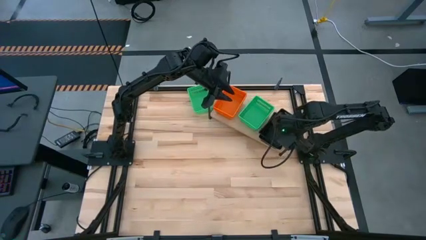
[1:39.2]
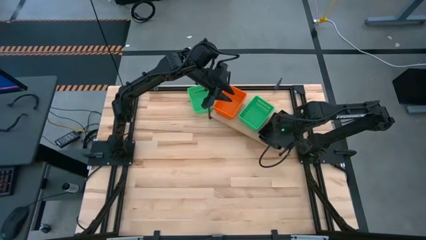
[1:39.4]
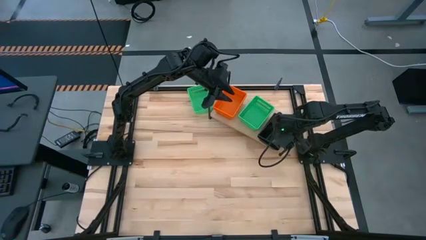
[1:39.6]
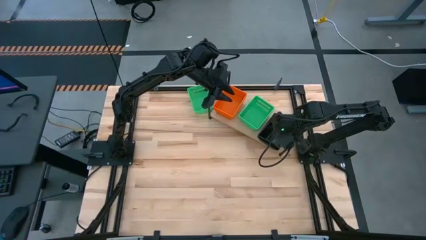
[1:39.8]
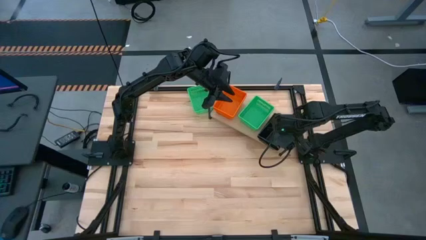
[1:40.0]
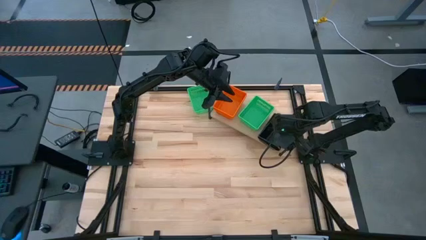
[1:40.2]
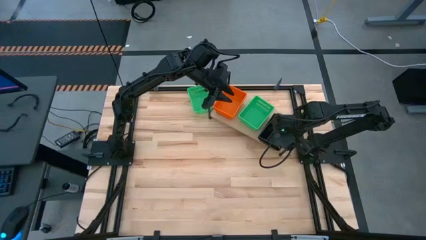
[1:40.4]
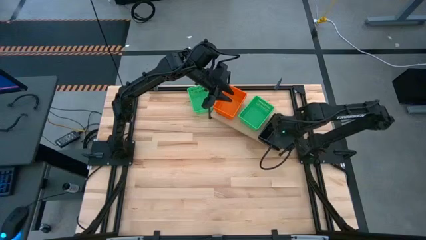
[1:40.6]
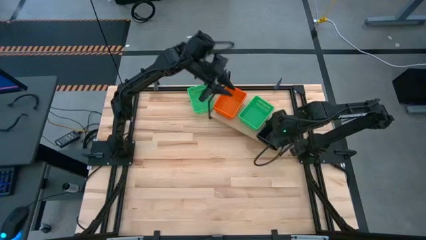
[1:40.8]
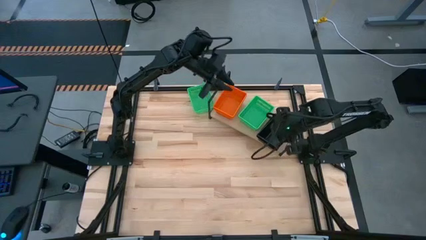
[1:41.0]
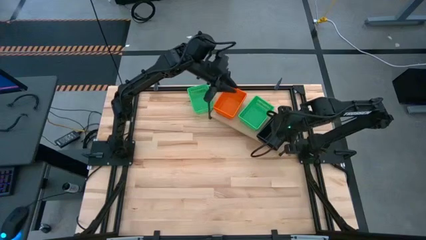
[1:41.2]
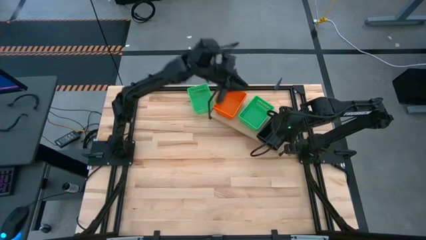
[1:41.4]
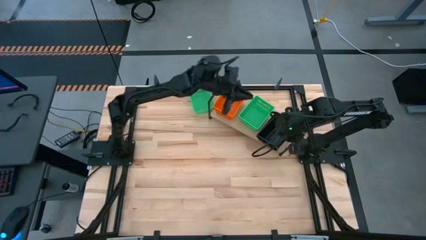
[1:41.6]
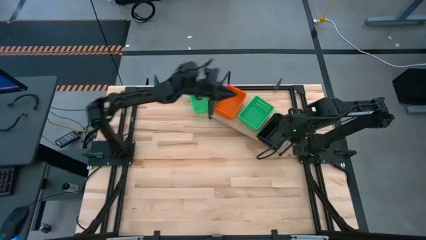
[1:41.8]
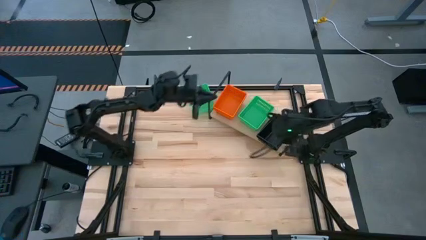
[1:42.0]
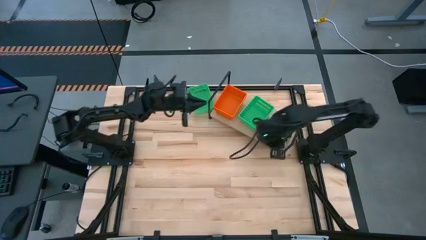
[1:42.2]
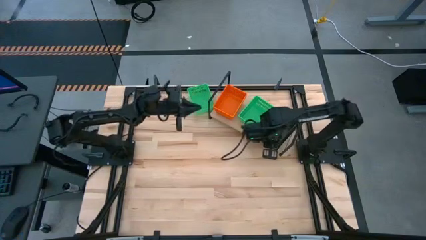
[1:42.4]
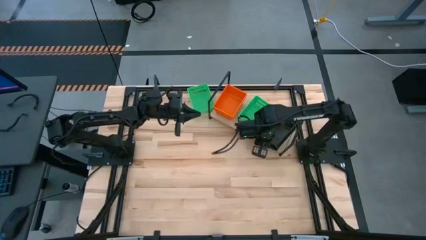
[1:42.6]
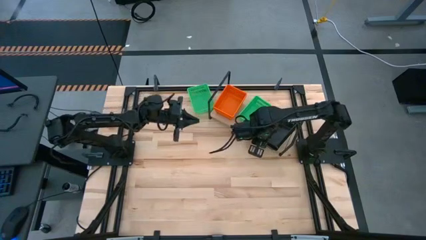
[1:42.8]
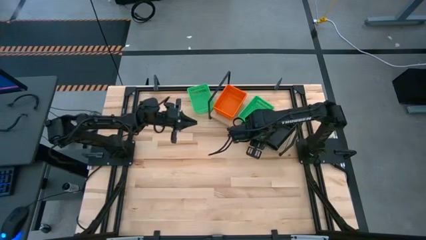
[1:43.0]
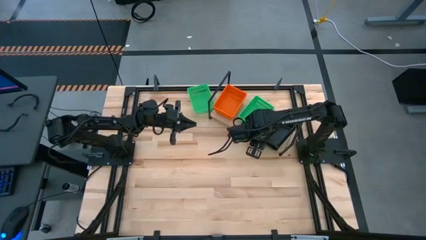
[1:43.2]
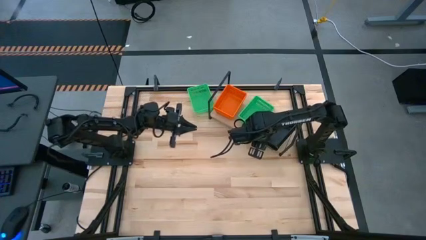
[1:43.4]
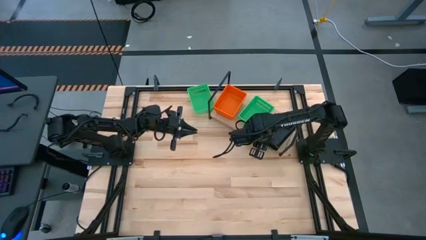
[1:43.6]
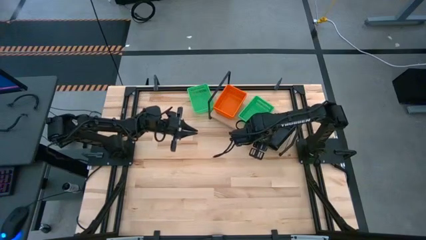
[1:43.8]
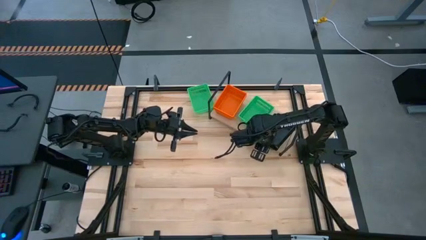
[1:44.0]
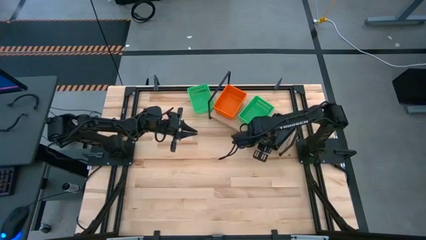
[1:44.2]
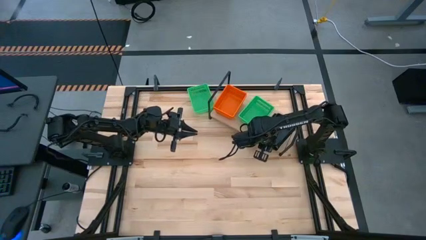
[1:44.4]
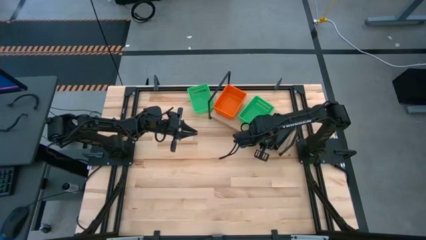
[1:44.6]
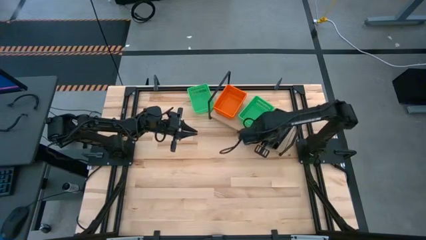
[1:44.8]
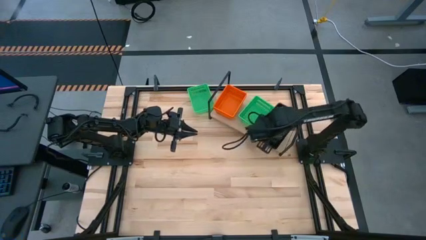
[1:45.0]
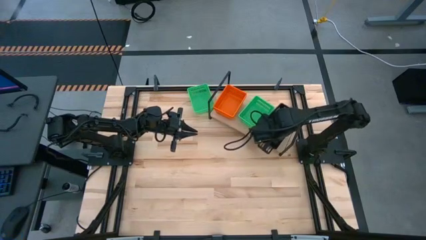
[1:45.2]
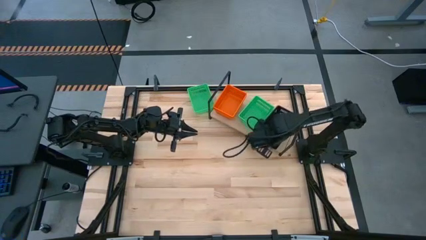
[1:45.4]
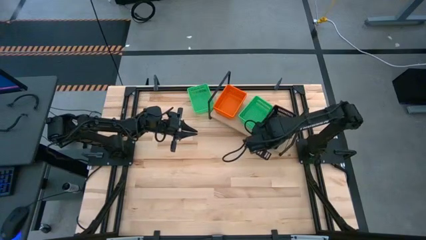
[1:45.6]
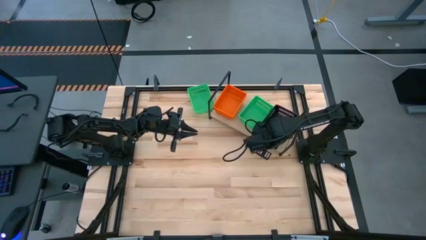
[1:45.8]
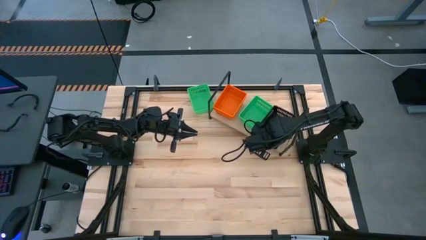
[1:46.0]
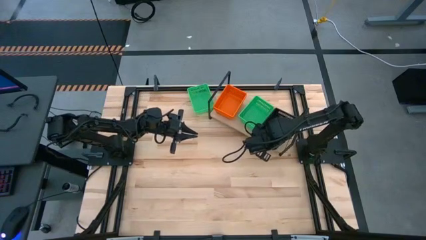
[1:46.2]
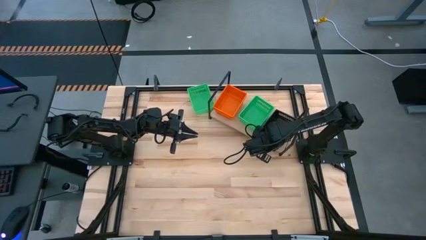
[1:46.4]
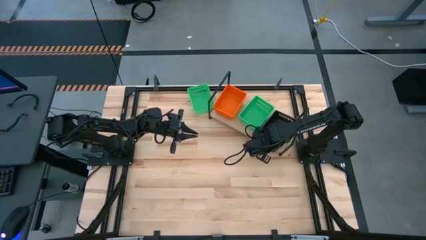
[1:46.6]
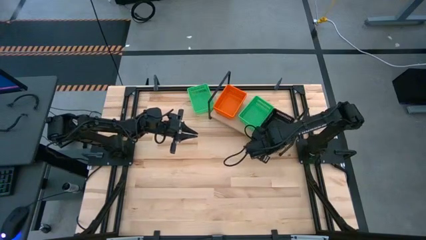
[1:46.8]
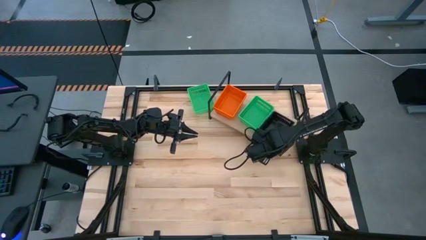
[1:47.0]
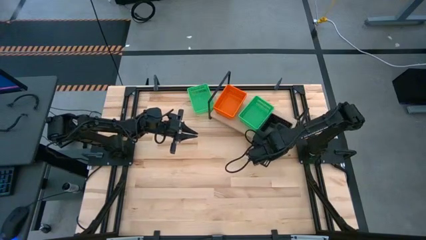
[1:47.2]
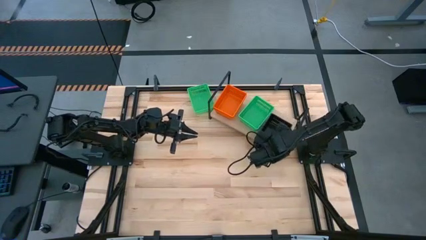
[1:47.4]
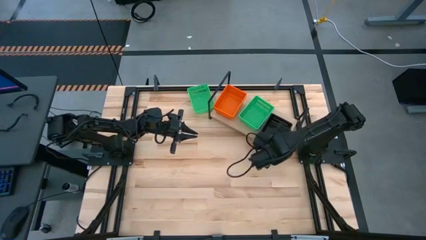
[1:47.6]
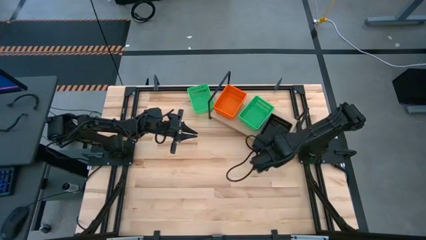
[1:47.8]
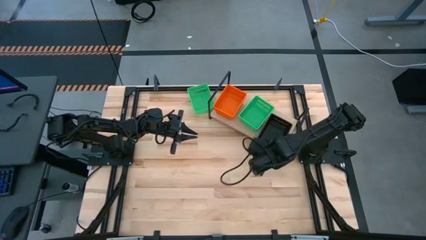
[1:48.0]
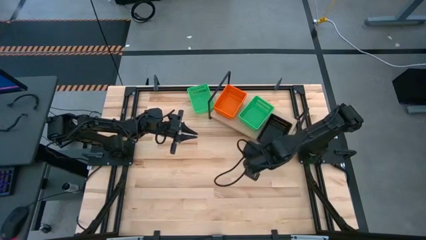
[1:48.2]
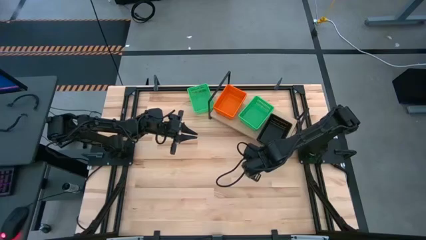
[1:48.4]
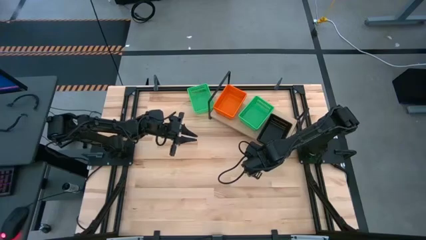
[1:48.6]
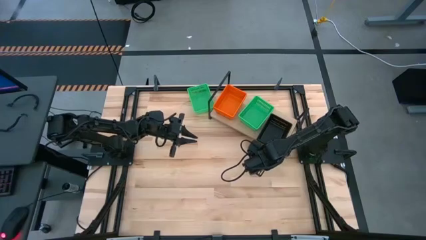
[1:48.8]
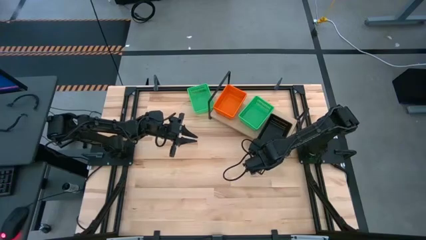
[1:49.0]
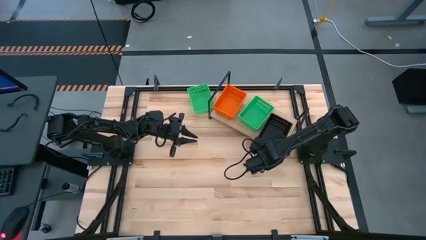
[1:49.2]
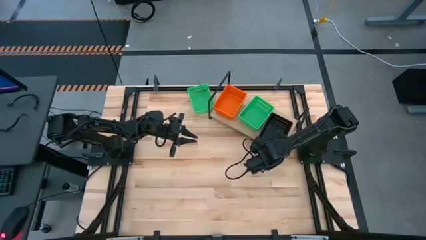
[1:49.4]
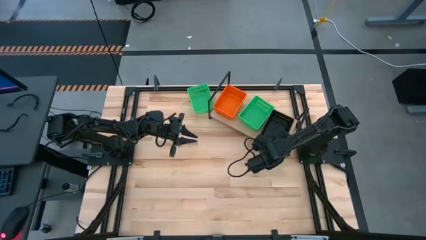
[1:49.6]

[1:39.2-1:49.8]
Task: Stack baskets on shelf by color
Stack the black basket on top of the black basket on the shelf
